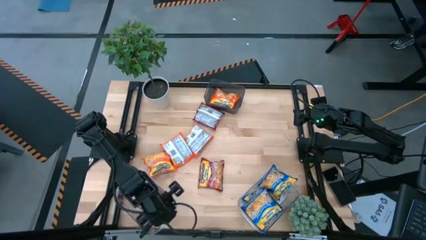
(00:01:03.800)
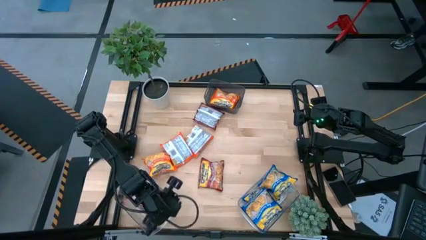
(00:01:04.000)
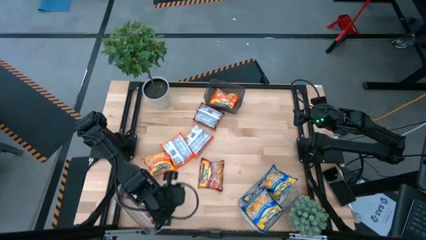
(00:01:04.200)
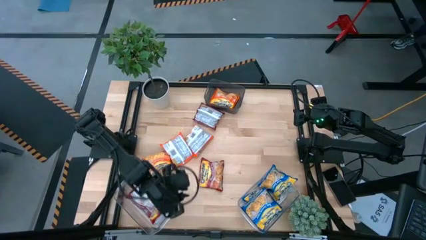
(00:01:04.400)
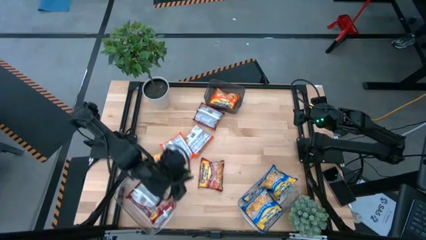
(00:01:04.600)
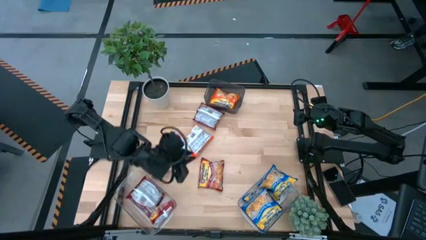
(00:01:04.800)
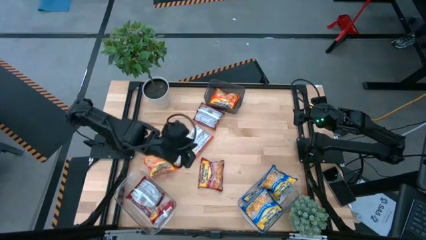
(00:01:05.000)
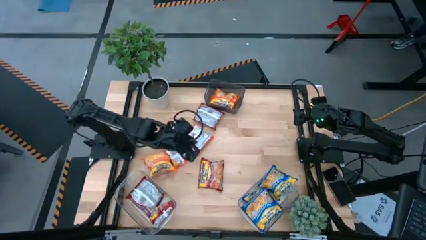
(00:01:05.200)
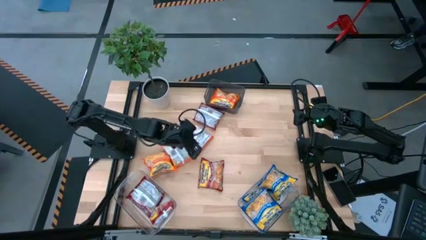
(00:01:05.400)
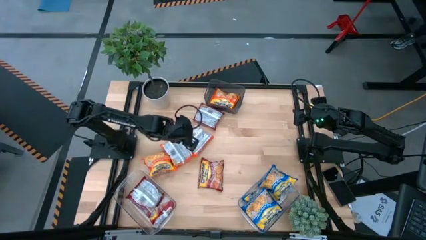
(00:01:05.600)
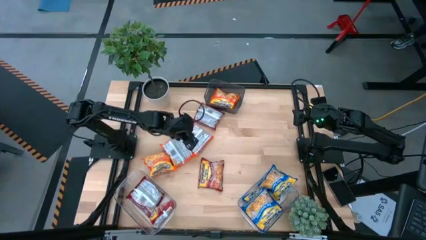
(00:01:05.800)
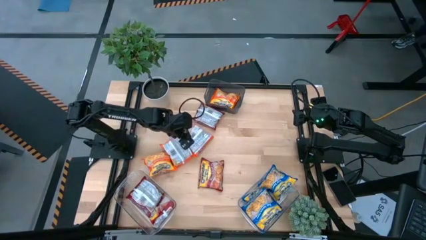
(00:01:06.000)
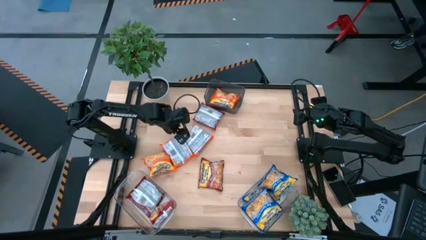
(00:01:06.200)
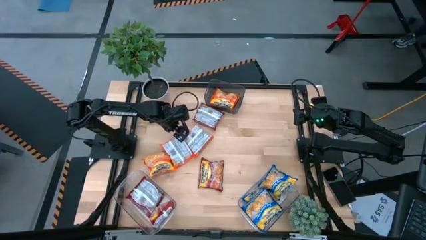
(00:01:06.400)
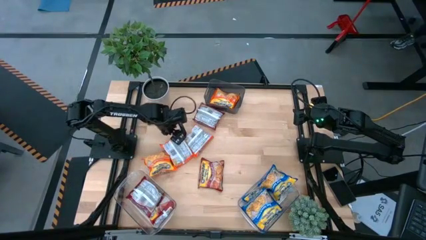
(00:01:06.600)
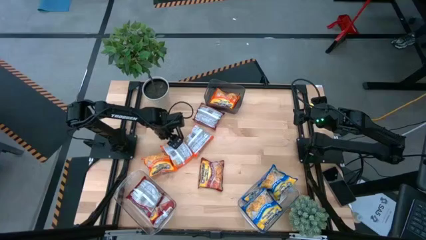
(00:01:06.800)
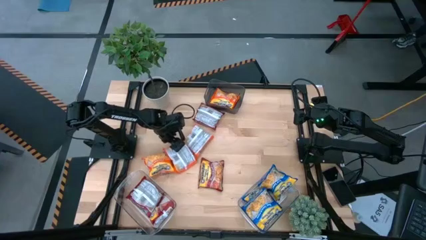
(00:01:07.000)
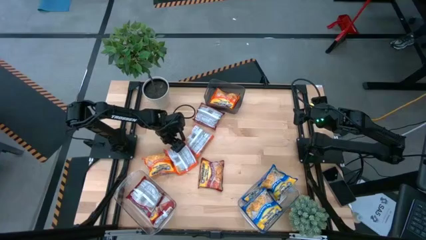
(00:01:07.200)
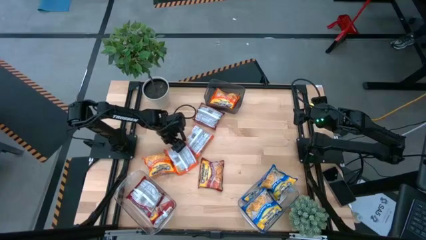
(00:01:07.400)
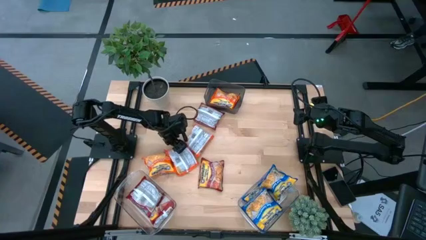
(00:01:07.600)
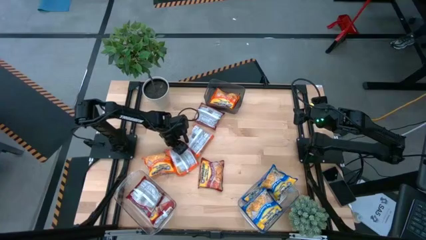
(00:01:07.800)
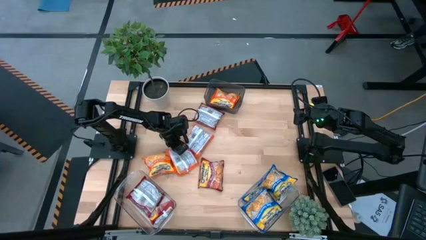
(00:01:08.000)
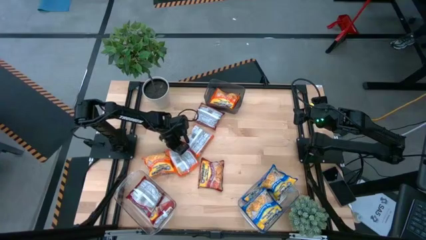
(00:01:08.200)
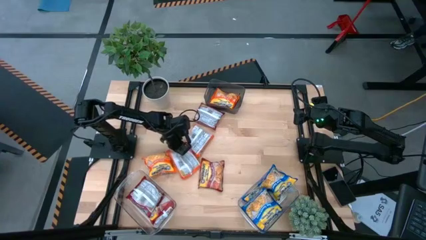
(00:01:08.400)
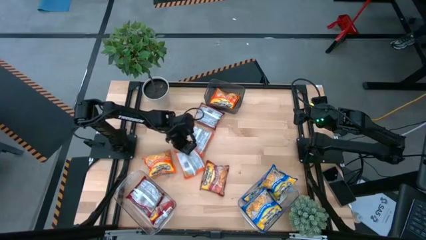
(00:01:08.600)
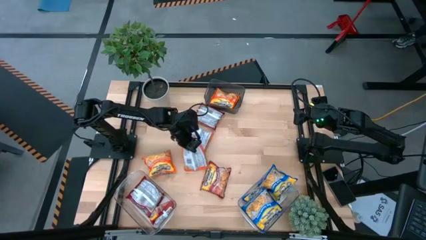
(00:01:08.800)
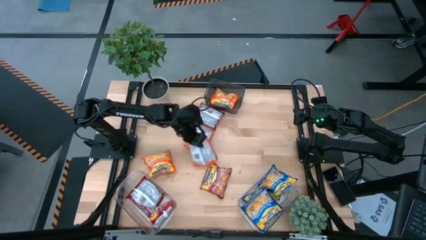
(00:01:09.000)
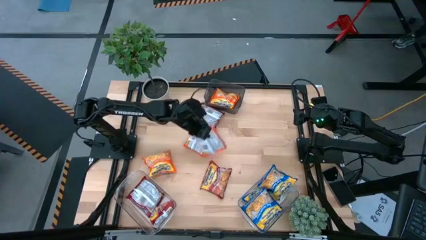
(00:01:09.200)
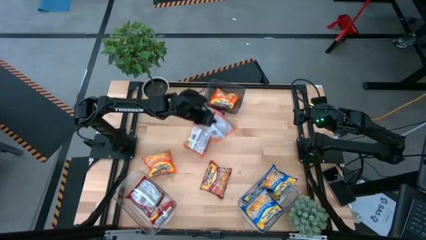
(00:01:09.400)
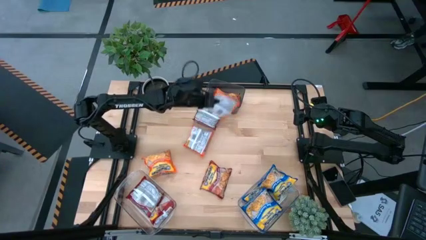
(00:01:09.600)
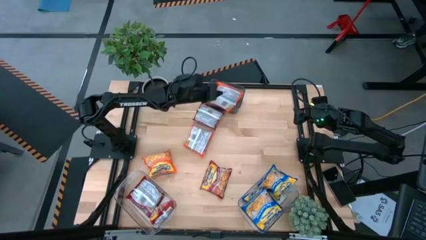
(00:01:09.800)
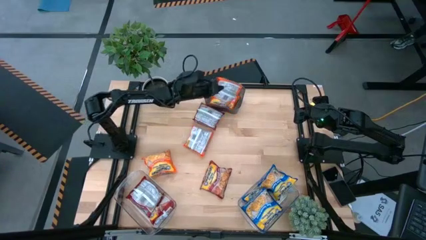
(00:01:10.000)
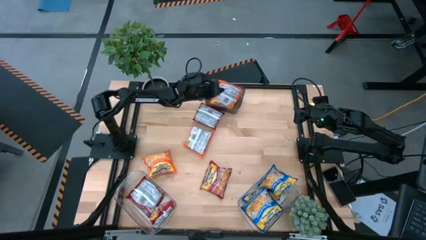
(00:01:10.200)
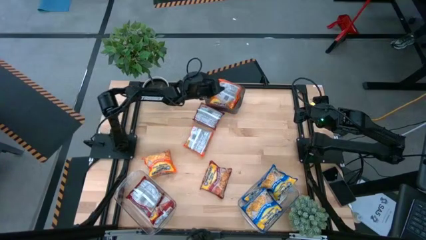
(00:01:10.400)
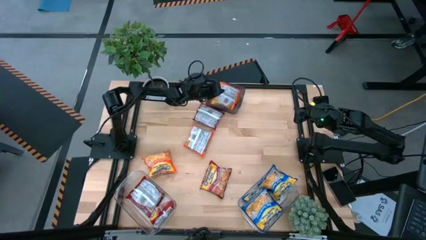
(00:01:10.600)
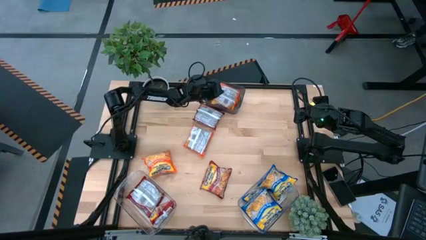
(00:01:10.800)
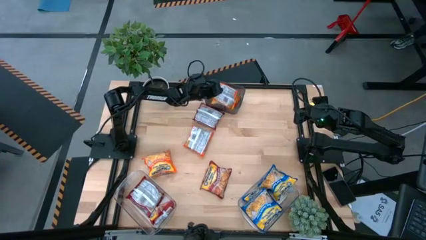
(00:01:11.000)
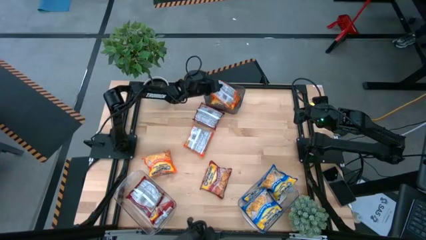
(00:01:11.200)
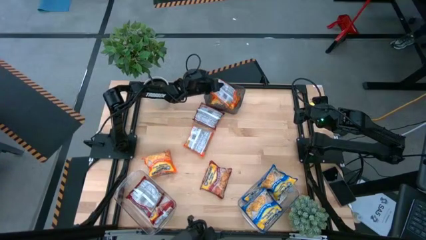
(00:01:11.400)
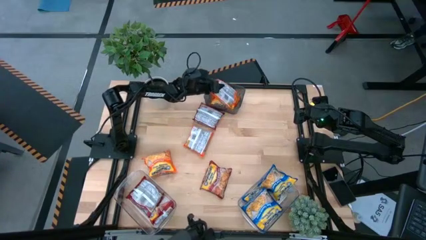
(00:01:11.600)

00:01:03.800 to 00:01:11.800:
Task: Sort Maruchan noodles
Put the orange noodle pack into the black bin

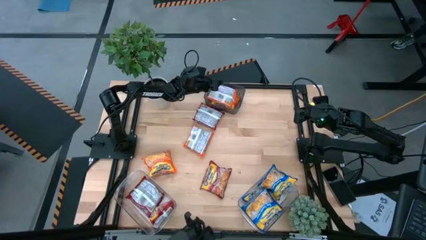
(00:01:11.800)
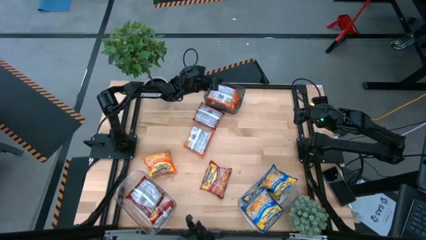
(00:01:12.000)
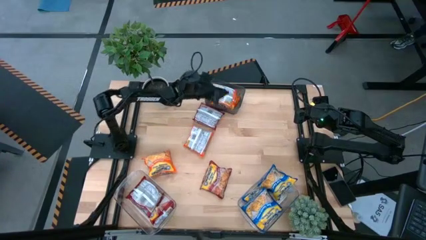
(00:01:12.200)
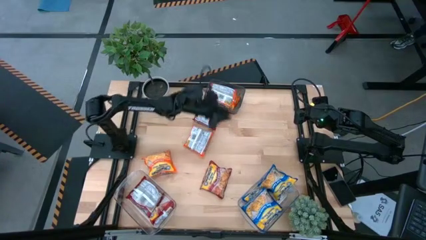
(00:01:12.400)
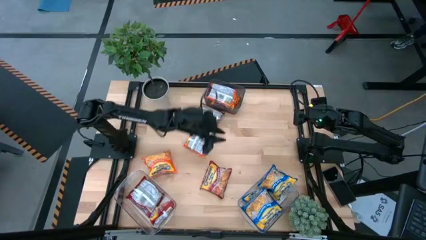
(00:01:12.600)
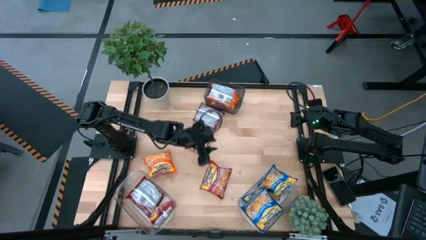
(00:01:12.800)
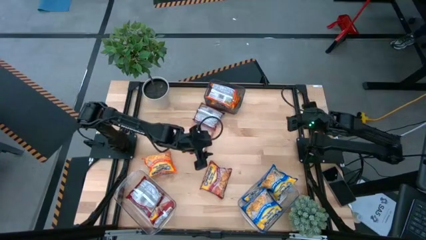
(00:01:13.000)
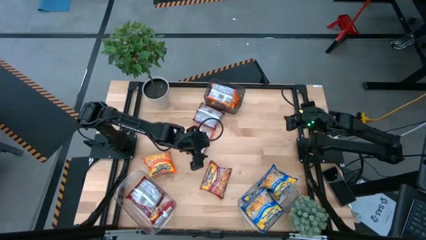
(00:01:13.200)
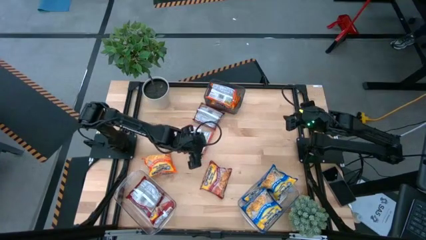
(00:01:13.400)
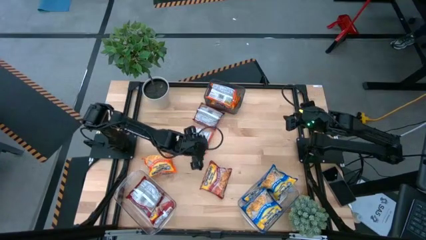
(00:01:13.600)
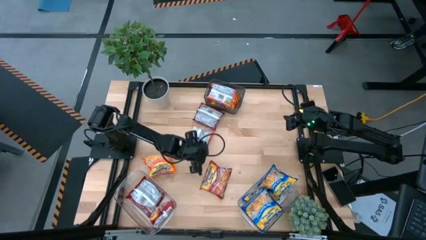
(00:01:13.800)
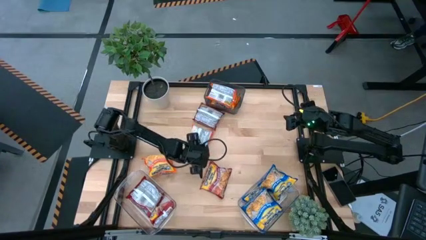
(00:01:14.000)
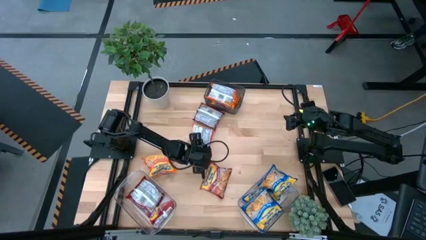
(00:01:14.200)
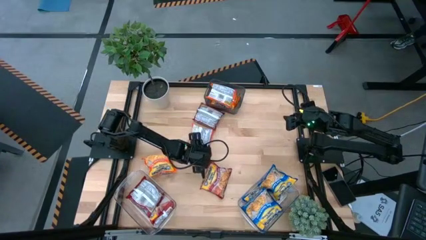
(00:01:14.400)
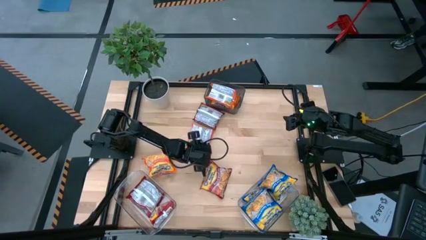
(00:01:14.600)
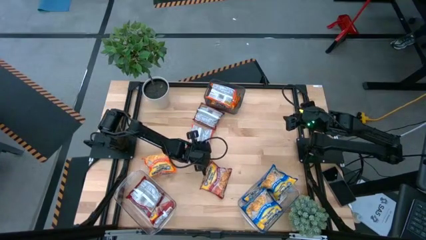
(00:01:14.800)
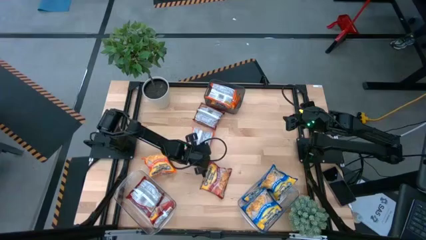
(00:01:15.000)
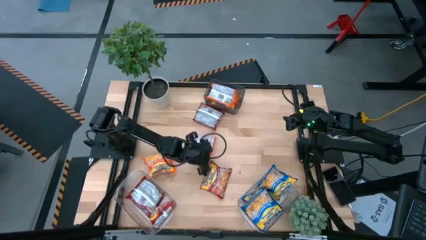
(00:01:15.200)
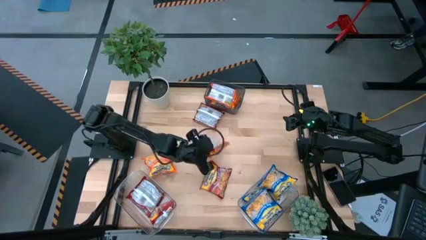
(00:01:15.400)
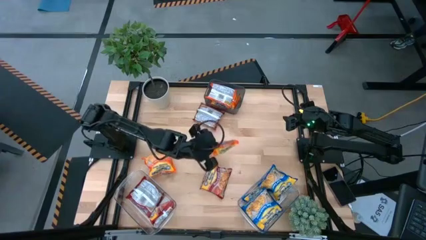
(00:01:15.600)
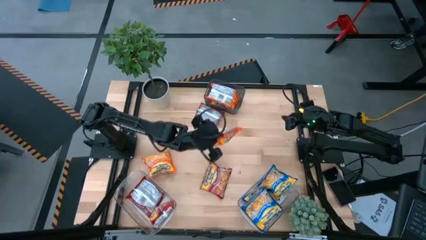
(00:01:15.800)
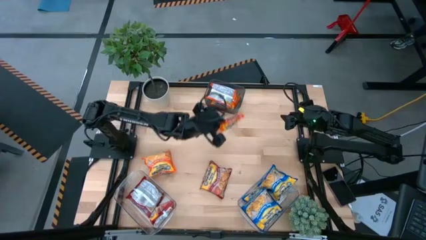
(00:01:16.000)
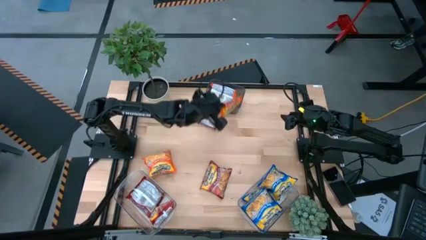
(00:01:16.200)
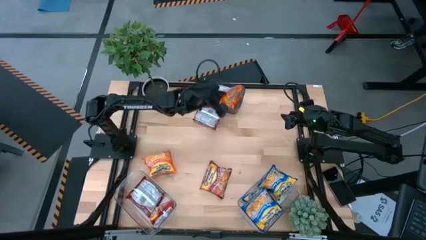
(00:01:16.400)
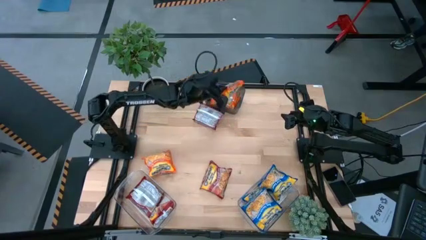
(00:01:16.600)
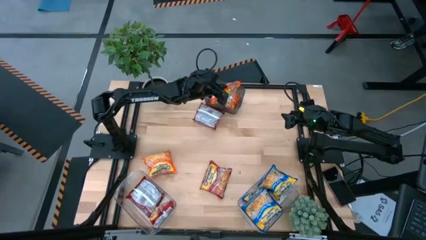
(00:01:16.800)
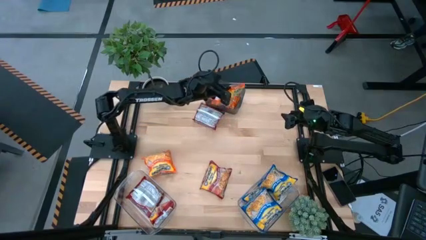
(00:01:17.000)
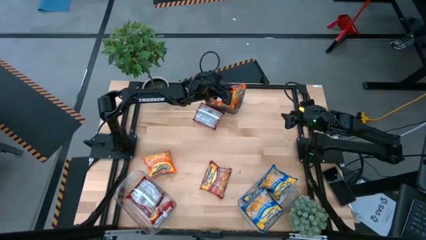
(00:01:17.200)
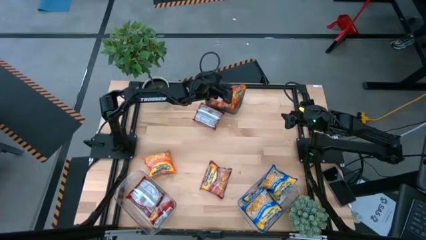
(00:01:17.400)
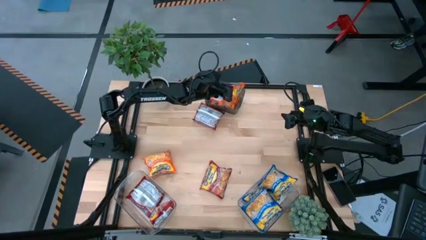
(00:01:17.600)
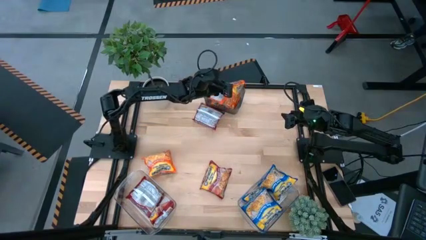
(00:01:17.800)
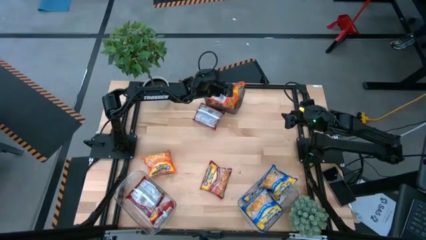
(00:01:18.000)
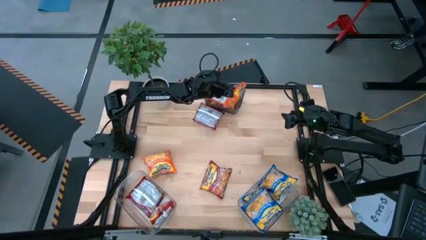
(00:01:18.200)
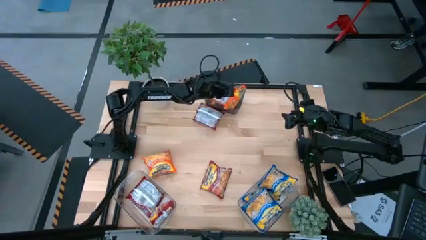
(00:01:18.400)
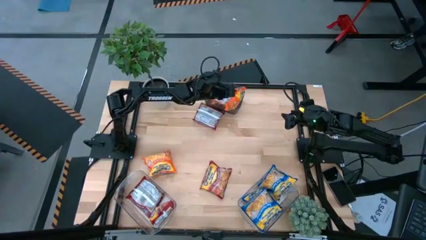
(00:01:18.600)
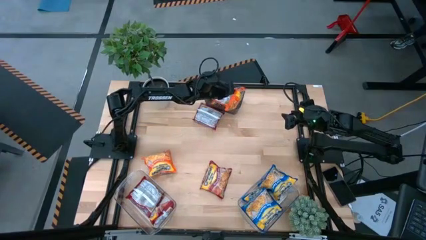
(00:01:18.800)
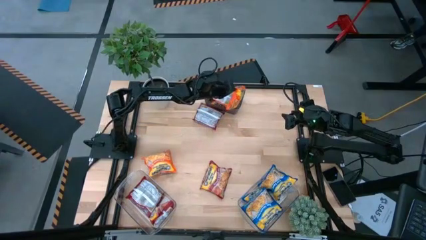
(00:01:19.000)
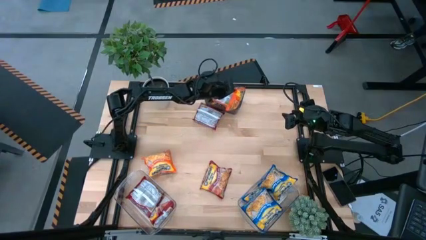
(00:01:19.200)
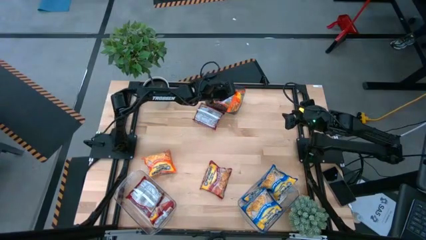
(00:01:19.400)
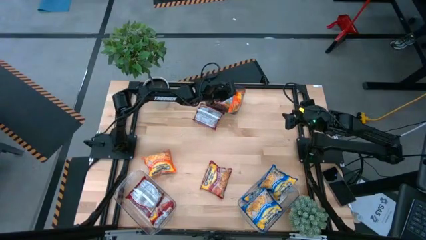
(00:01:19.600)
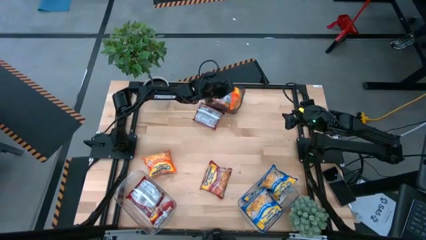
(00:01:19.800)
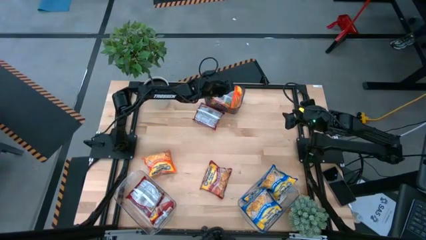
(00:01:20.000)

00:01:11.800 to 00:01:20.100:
Put the orange noodle pack into the black bin
